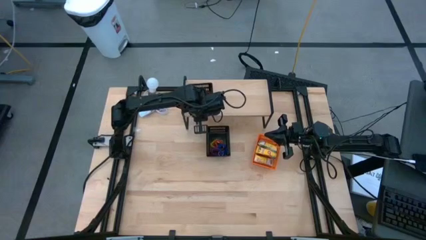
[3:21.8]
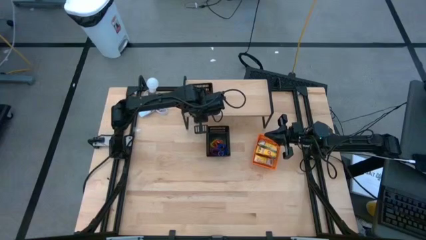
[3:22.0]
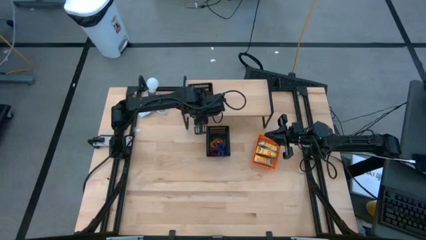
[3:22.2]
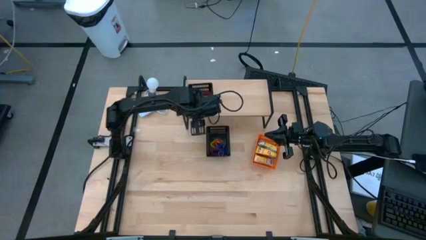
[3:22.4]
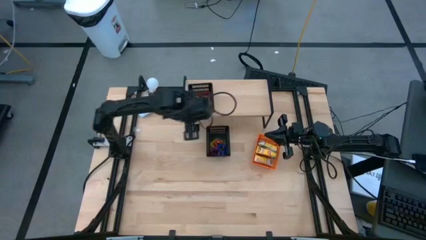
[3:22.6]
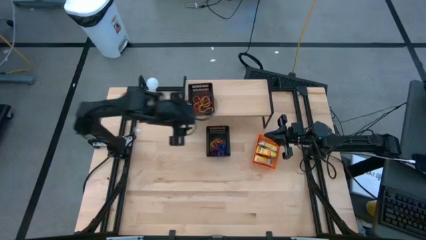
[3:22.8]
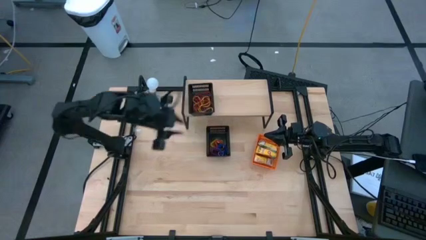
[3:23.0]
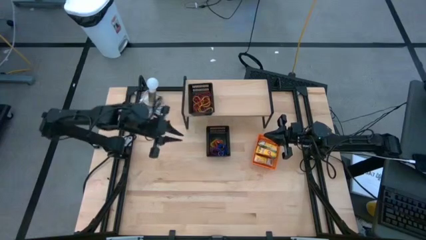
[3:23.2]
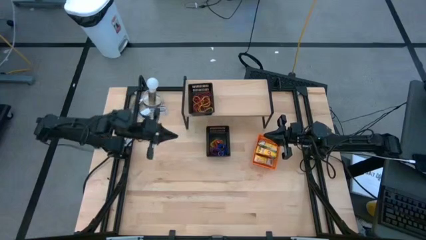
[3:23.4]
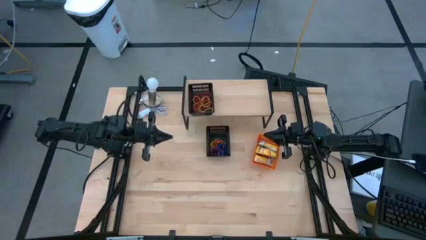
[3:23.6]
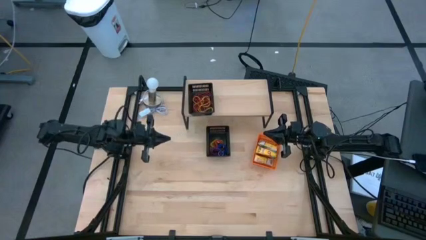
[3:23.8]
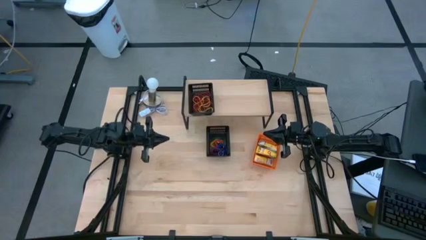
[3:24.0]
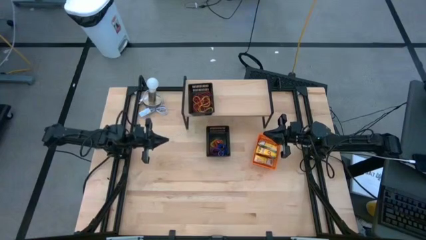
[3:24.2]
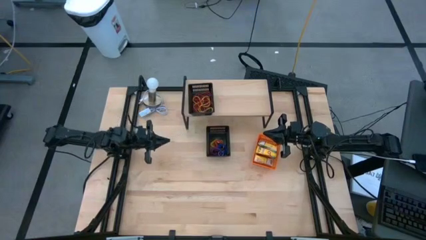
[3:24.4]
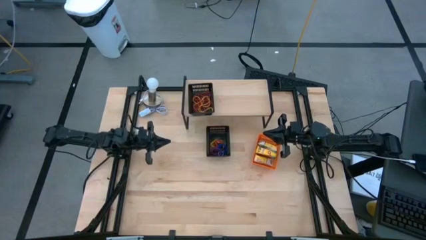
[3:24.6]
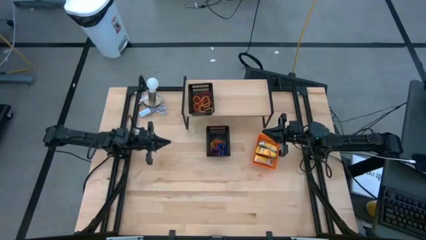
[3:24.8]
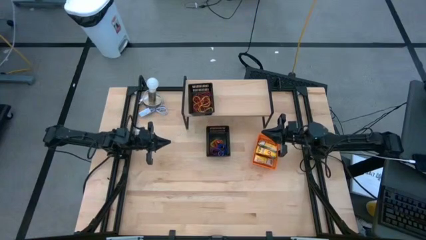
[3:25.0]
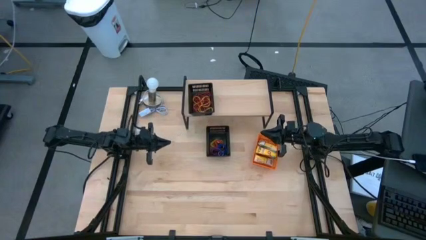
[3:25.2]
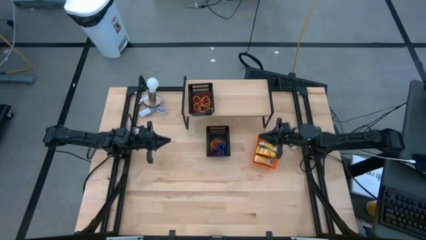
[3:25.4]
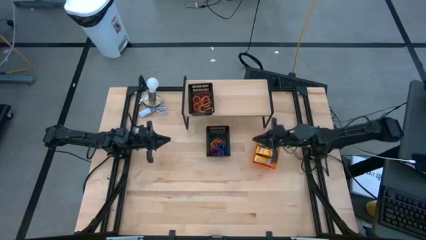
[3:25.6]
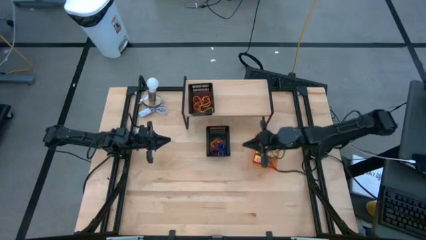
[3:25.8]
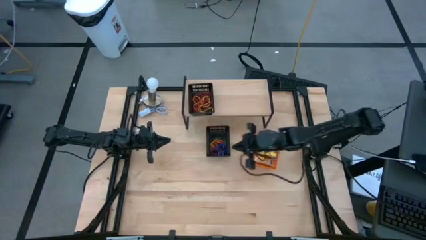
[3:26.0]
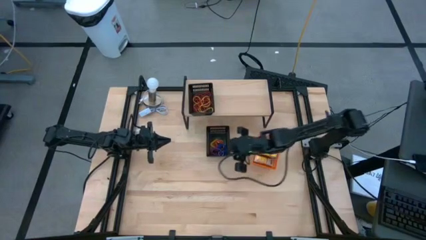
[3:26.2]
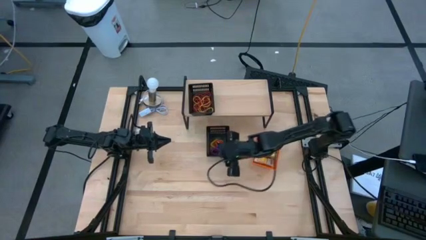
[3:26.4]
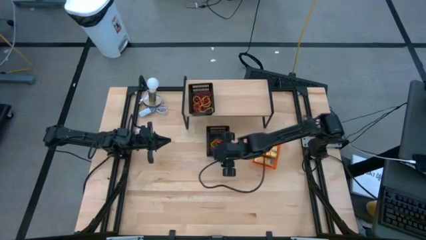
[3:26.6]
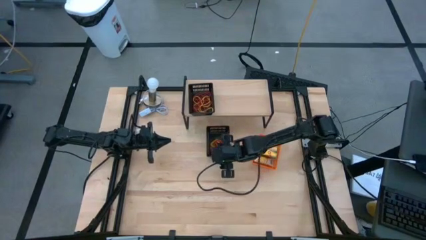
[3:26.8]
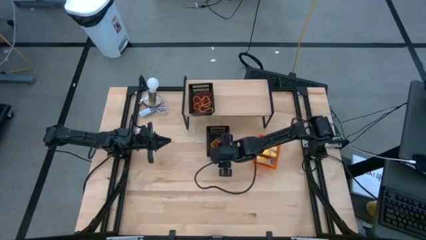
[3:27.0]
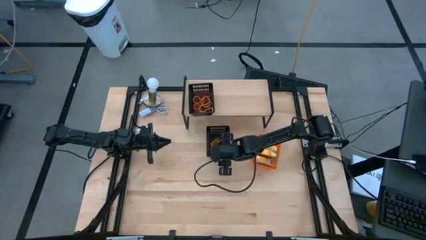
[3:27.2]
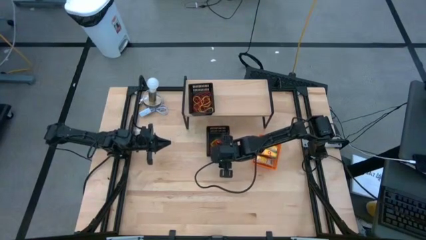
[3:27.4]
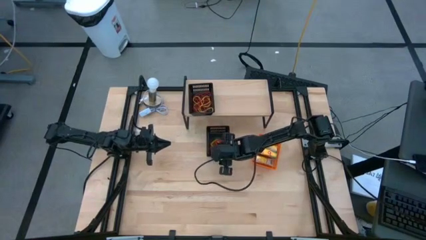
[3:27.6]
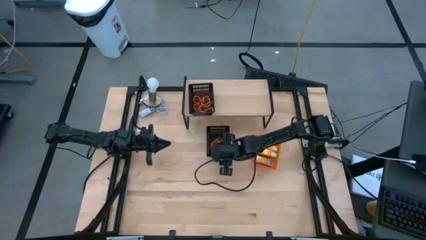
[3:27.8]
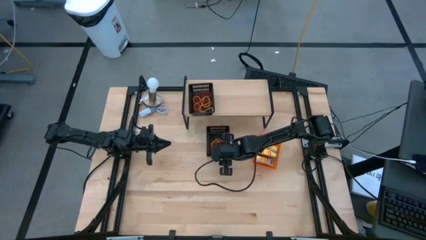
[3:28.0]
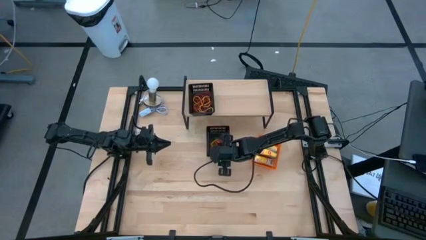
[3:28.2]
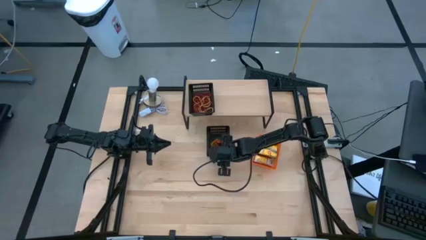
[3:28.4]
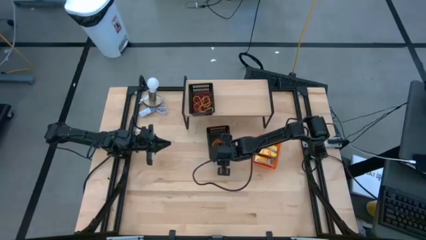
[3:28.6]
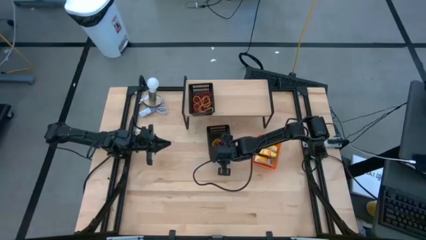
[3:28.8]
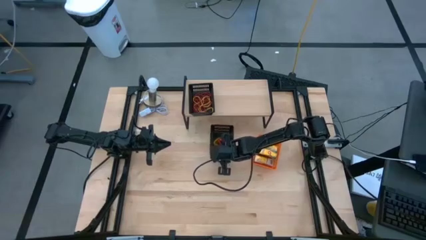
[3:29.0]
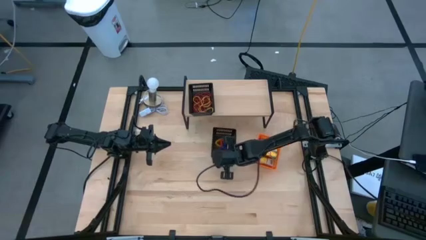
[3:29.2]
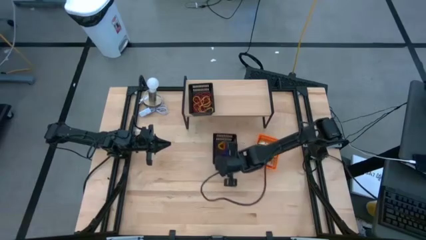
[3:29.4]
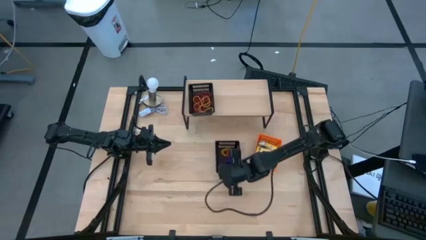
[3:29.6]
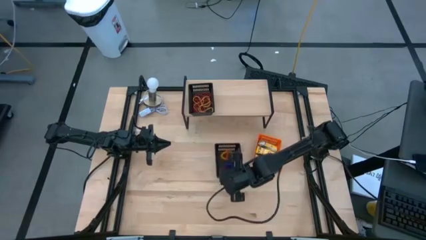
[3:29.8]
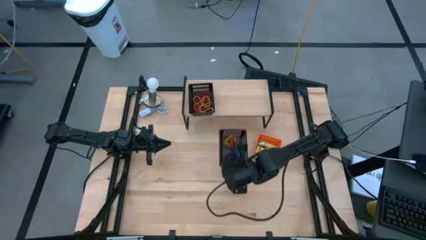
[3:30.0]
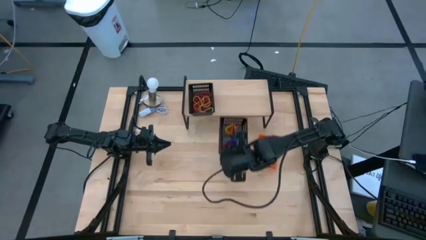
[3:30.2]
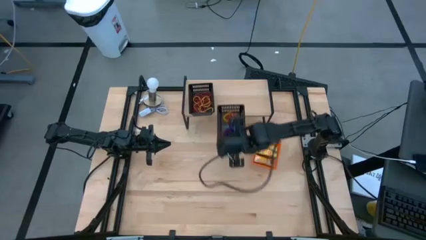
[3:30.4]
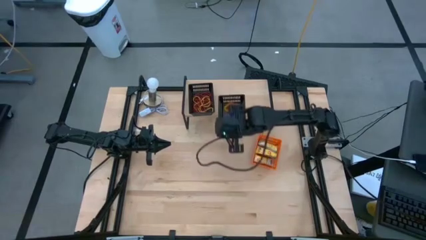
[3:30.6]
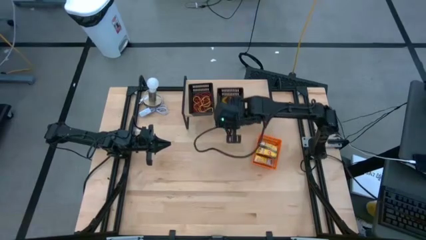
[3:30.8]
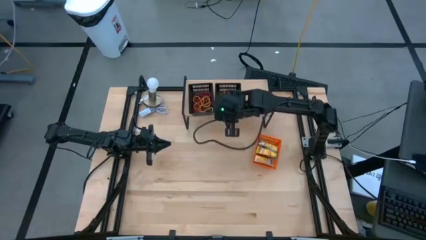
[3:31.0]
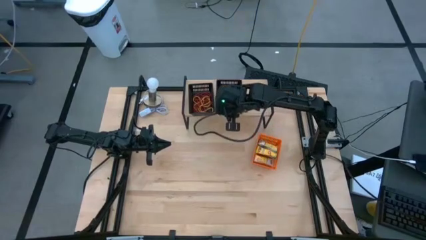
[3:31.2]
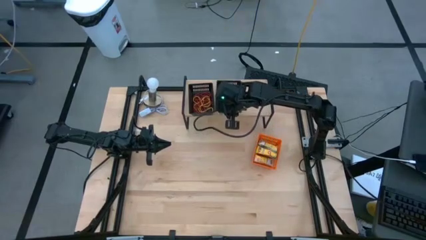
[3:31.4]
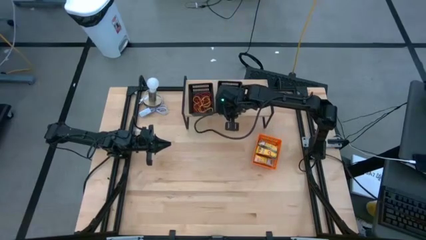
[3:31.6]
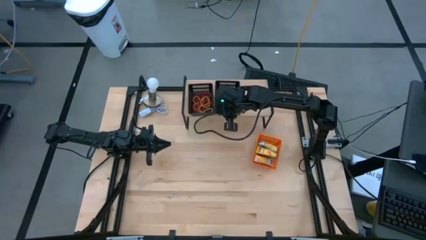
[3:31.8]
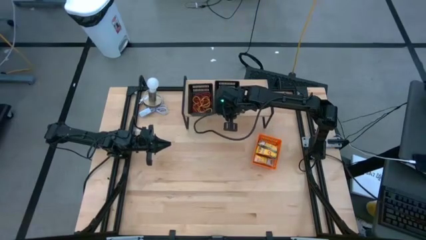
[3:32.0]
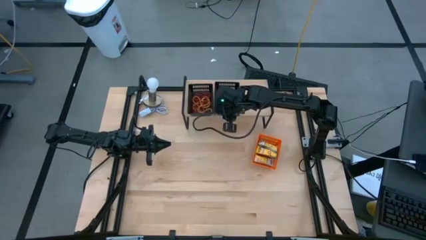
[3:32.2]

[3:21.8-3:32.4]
Task: Pick & Place Office Desk Supplies
Put the black basket filled with spring keychains on the shelf

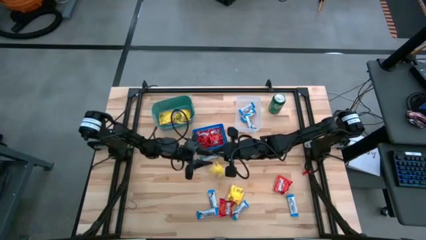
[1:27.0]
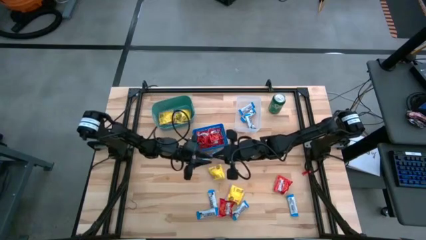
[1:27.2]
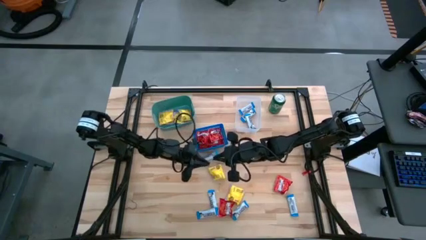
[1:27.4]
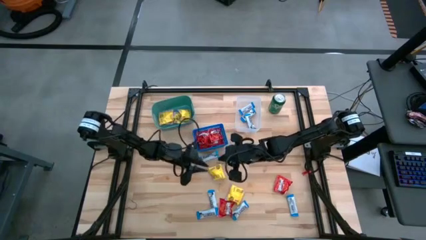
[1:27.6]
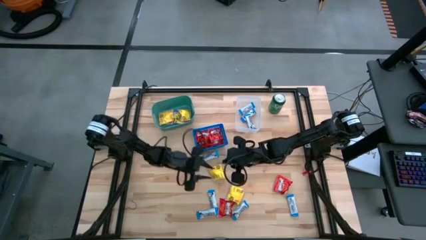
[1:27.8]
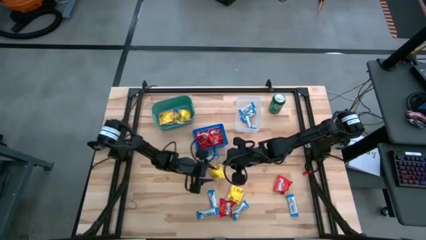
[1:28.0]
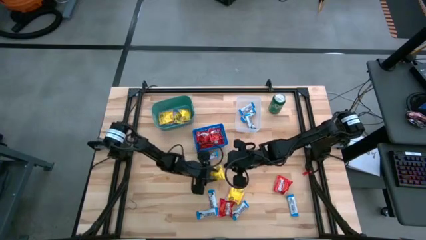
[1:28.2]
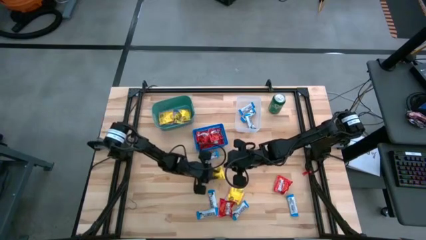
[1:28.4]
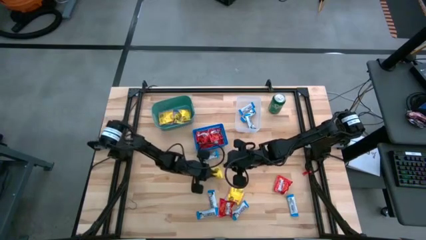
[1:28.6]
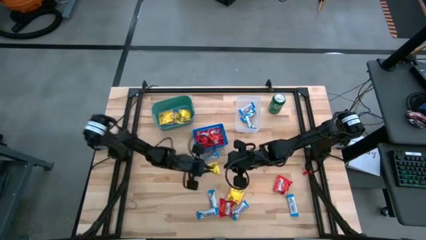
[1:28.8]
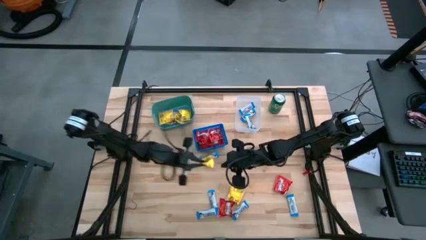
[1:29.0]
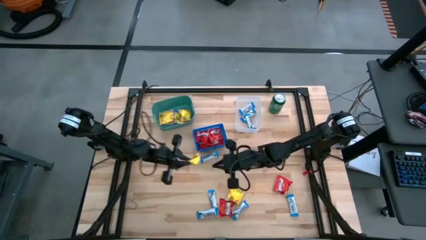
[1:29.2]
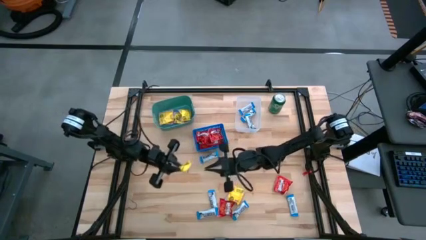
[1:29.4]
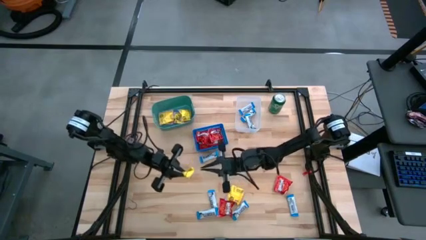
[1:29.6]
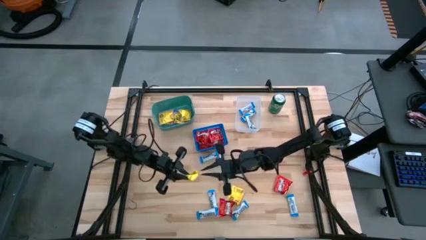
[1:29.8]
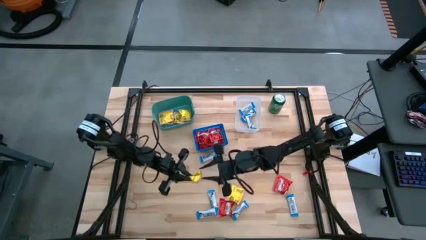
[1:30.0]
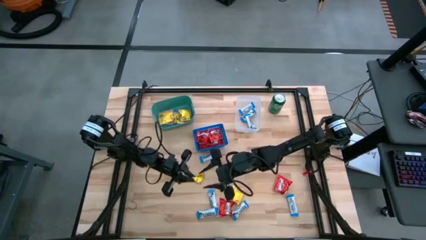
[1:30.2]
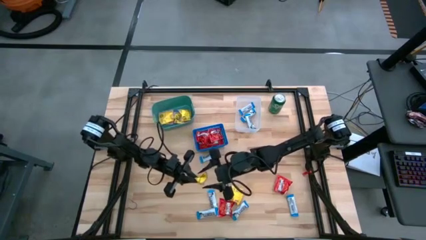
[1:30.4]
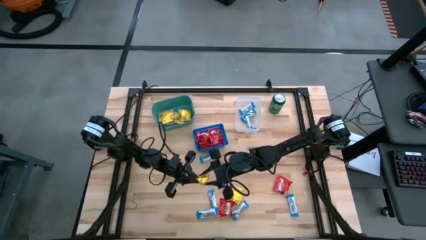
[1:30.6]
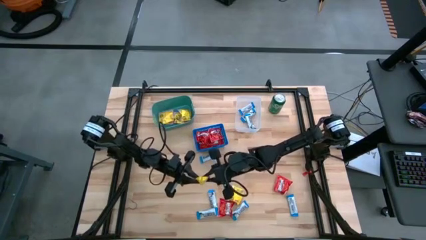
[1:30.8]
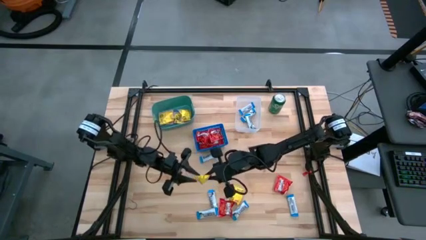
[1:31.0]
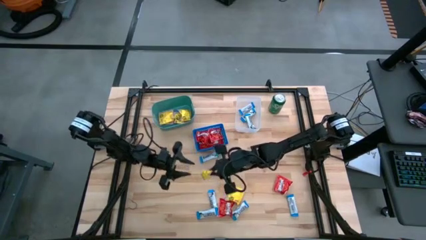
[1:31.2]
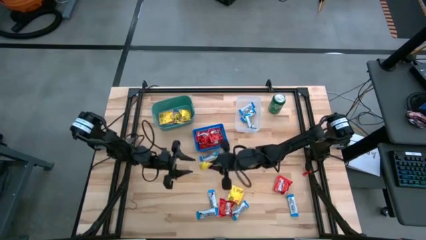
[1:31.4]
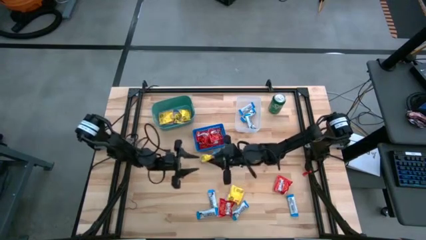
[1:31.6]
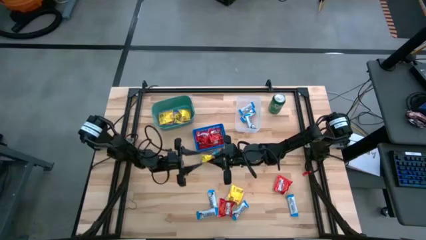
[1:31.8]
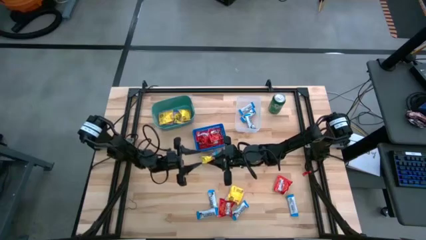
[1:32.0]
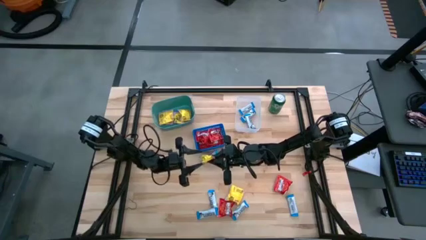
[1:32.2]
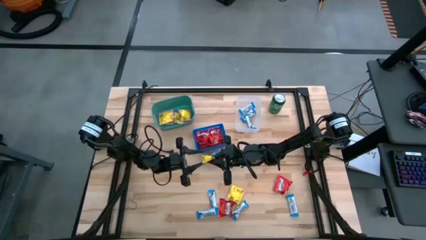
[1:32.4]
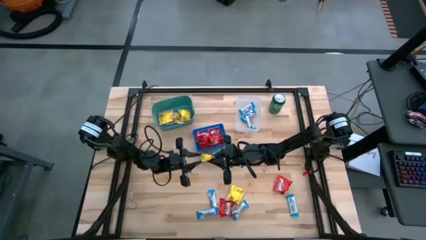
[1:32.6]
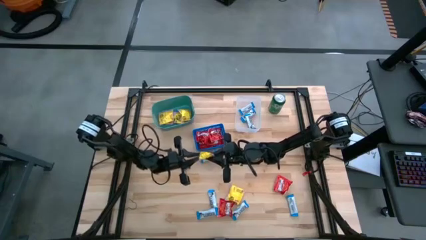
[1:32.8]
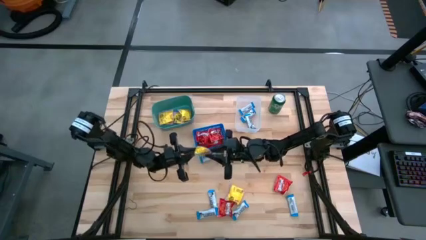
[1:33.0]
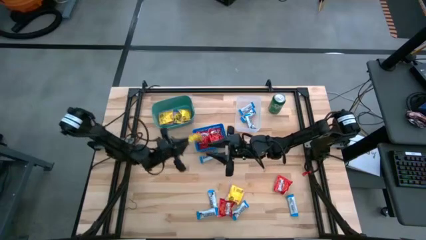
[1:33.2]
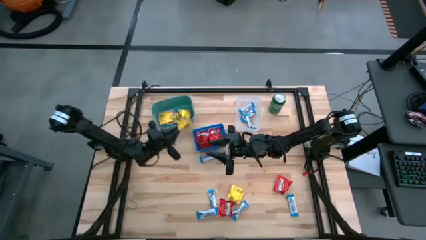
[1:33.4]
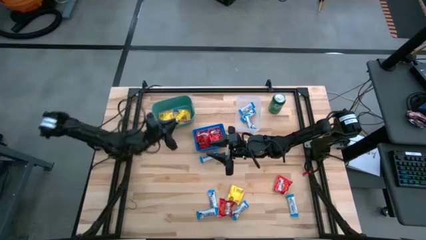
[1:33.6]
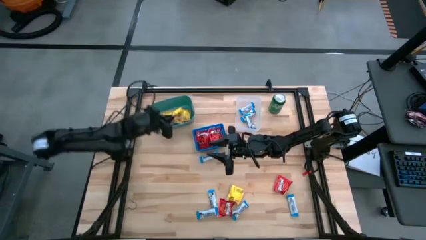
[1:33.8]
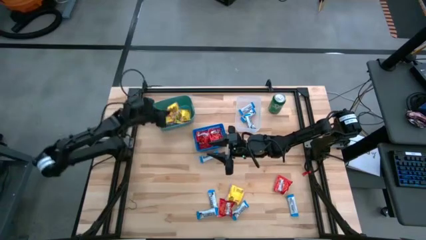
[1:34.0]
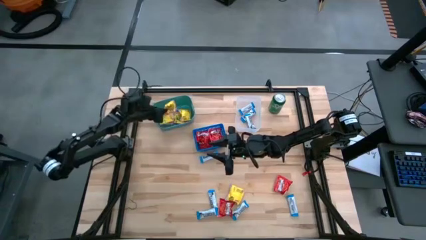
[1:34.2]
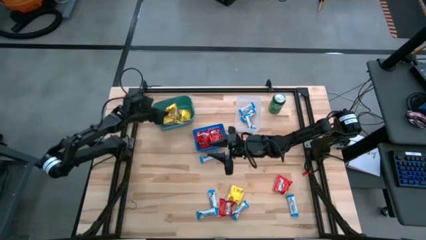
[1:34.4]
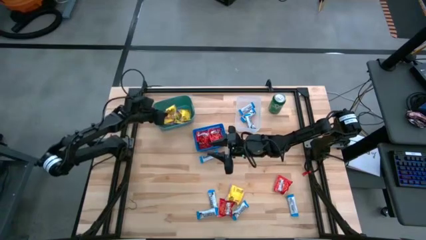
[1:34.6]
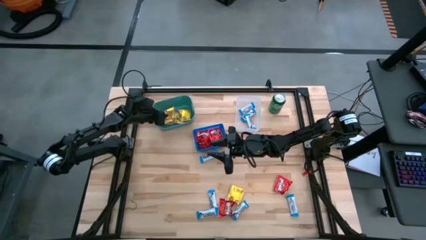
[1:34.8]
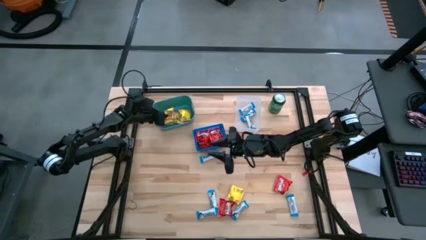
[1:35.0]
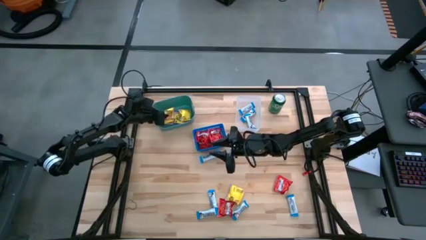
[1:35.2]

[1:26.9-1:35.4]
Task: Sort candy
Put the sour patch candy into the blue green bin
